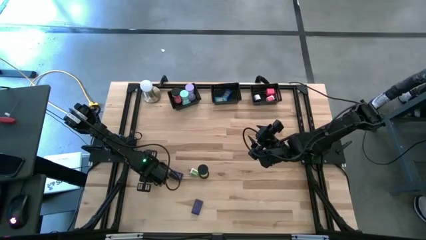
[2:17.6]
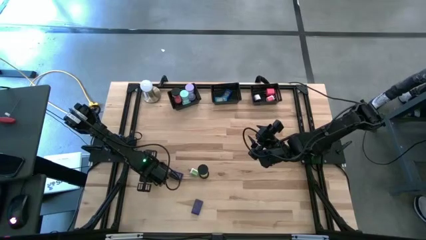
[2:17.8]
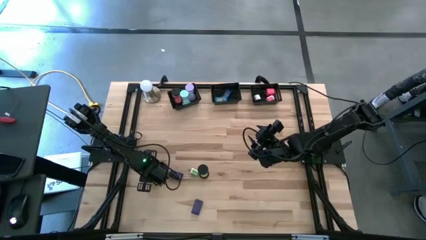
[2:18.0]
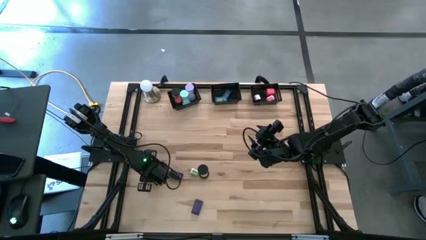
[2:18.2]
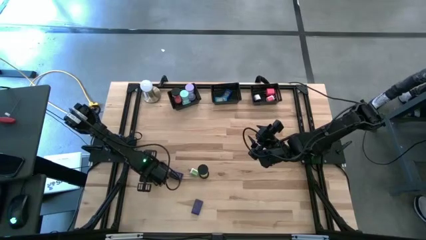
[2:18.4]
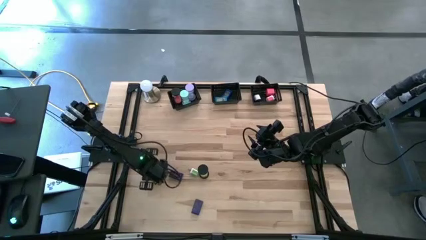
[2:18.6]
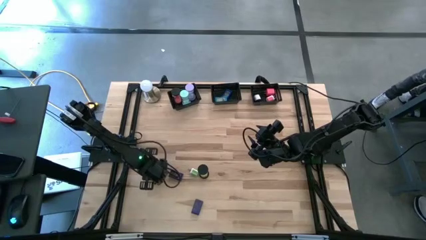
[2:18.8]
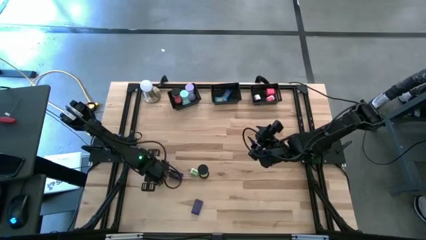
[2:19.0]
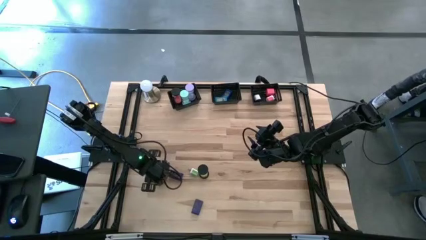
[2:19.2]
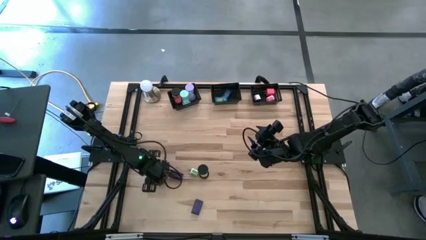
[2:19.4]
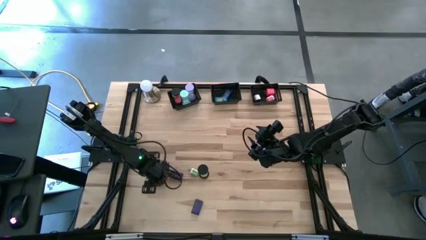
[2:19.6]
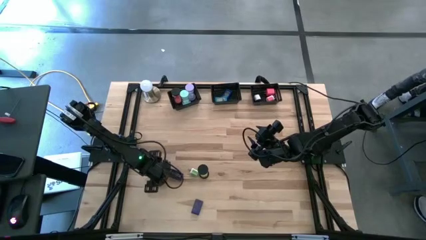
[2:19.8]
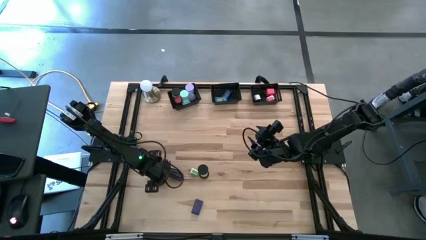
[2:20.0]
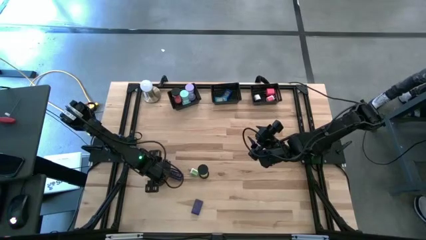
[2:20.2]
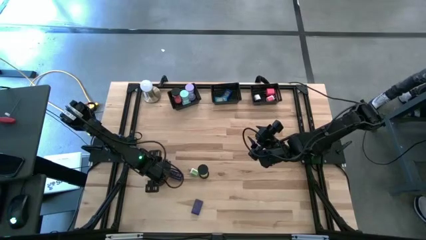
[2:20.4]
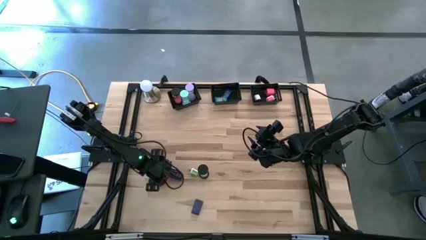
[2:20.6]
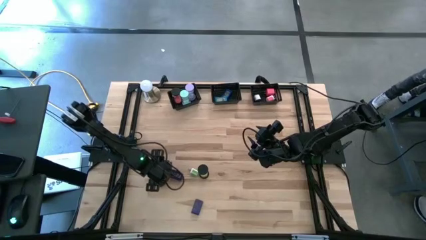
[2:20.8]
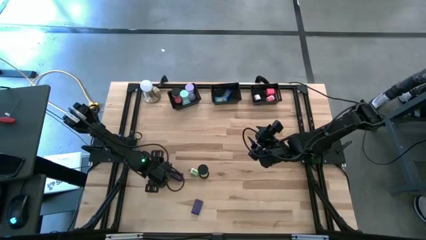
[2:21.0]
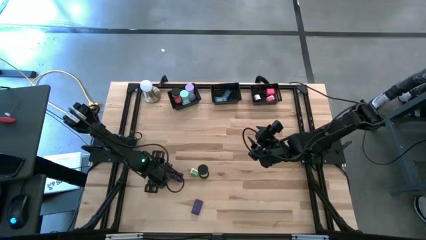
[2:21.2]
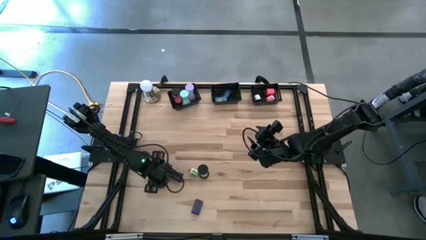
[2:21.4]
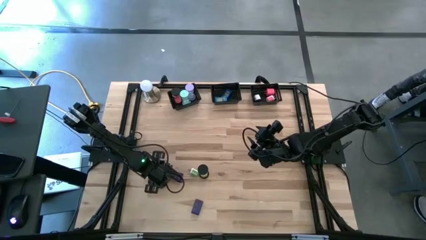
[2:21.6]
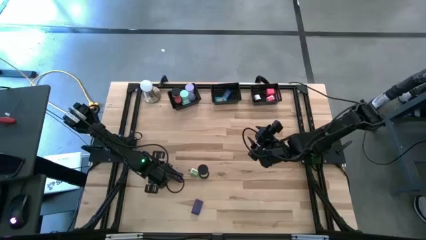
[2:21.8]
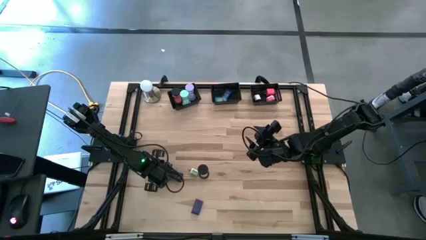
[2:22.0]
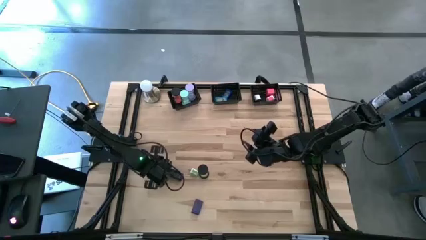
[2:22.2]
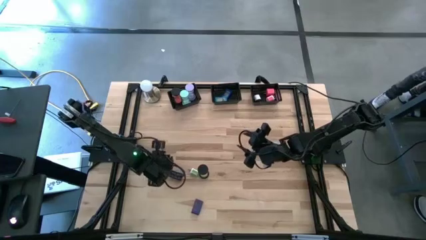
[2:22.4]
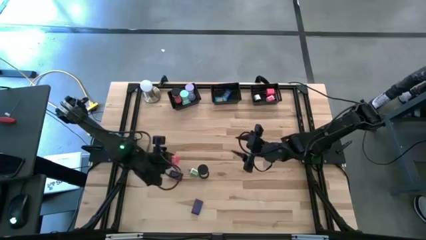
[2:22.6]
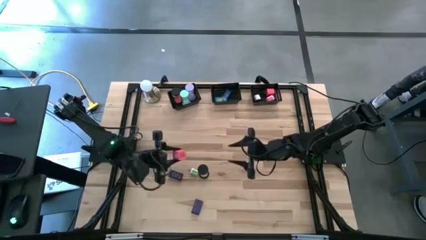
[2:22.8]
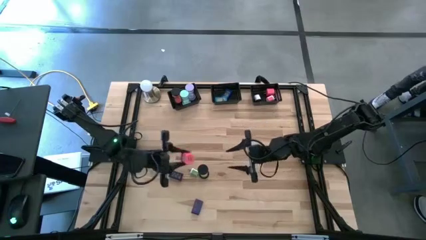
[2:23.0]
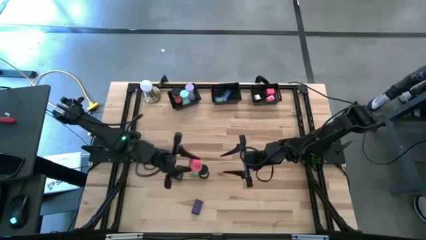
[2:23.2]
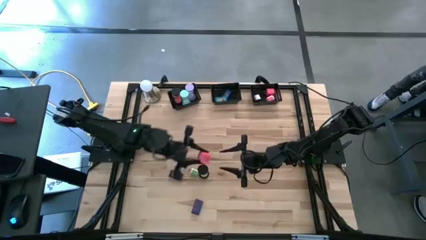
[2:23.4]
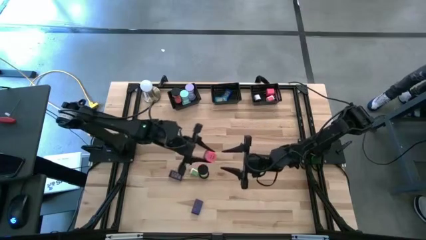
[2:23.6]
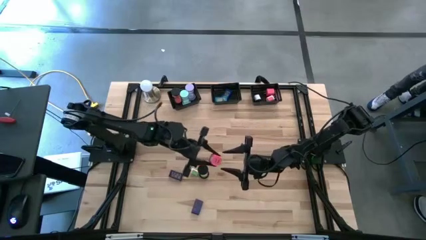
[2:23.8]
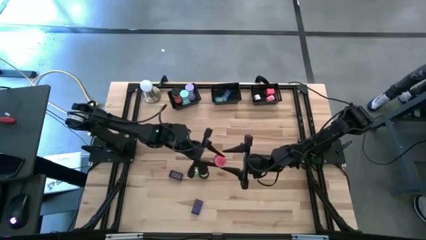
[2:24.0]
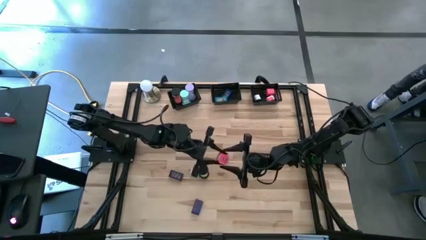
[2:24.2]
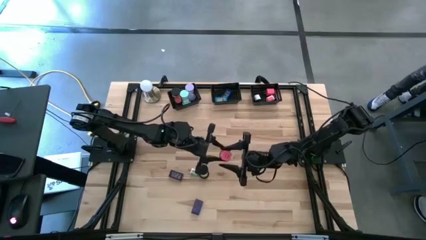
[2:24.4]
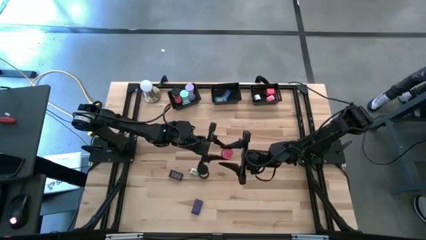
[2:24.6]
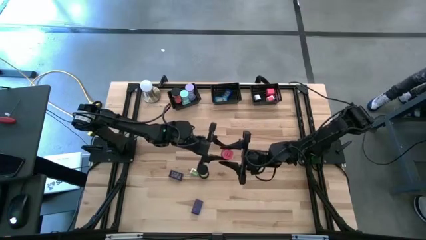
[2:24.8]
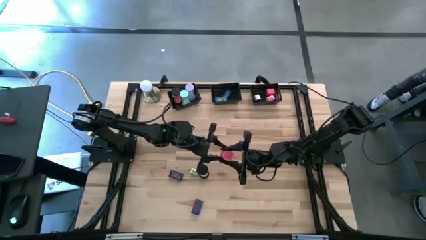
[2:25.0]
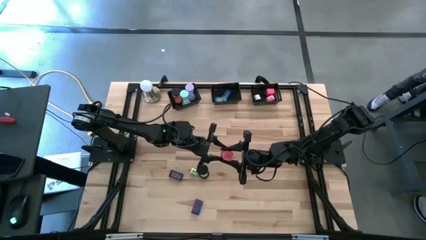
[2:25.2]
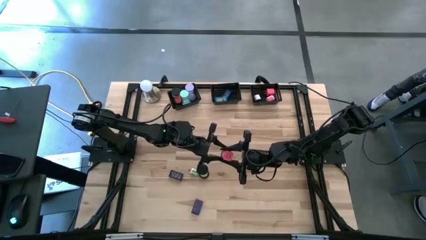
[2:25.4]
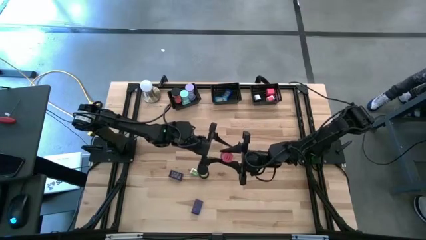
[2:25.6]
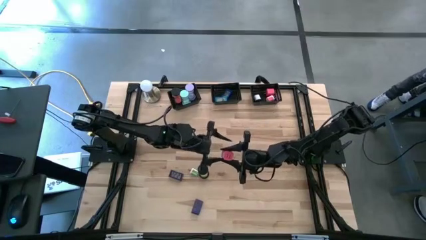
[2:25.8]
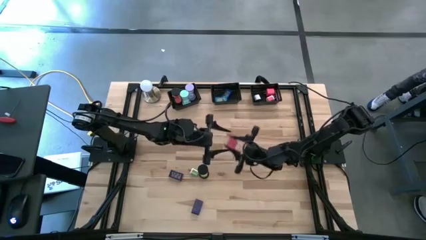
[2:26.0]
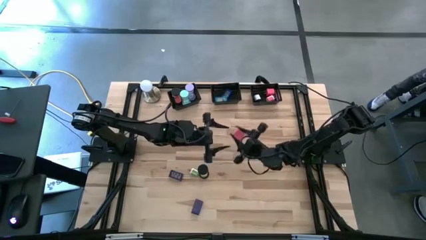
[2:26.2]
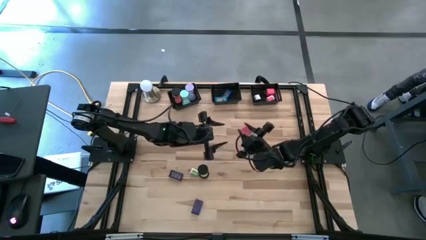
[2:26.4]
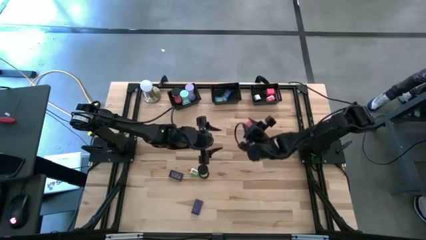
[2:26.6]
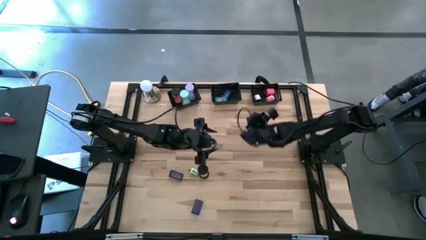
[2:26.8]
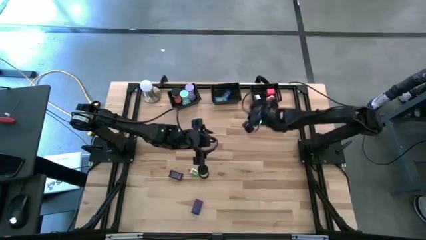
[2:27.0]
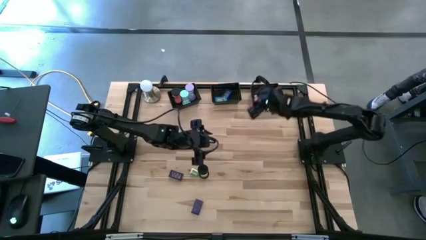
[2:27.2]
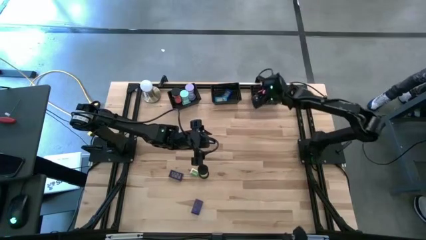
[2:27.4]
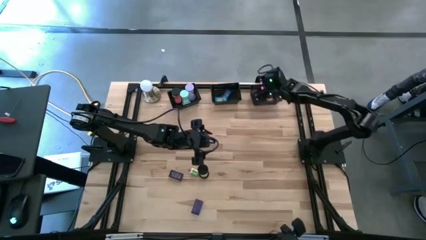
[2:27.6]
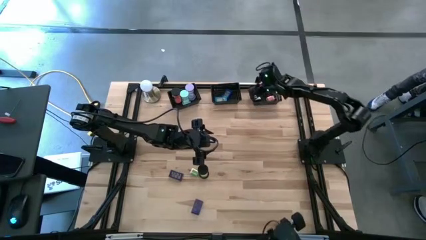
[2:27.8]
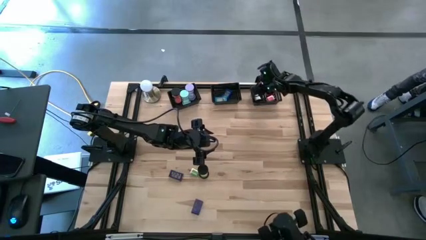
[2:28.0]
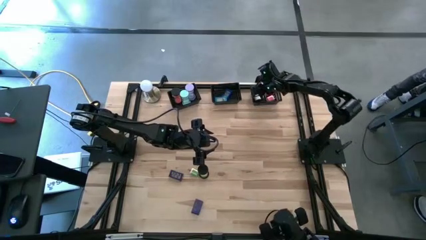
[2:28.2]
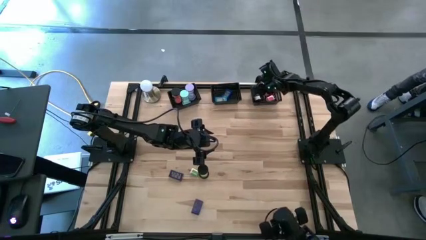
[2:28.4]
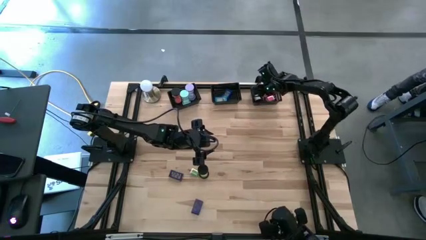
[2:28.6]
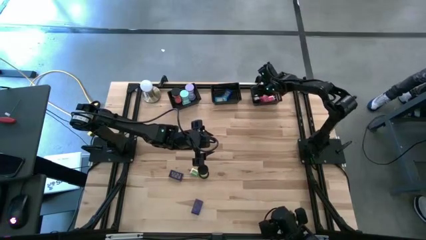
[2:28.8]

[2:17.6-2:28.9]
Task: Pick & Place Office items
Put the pink charger adapter into the right black bin
